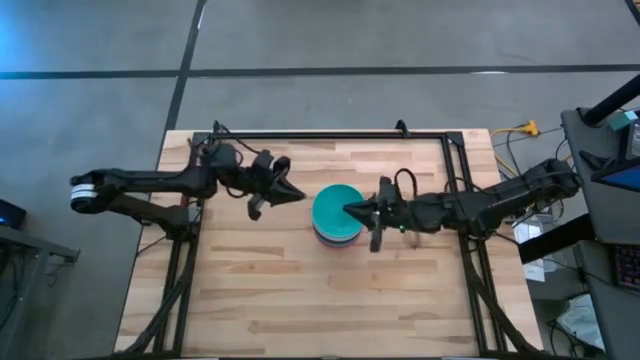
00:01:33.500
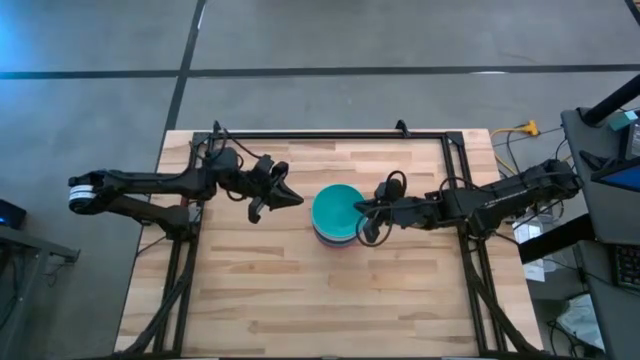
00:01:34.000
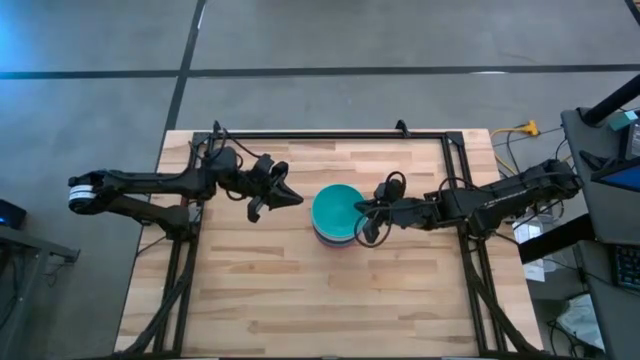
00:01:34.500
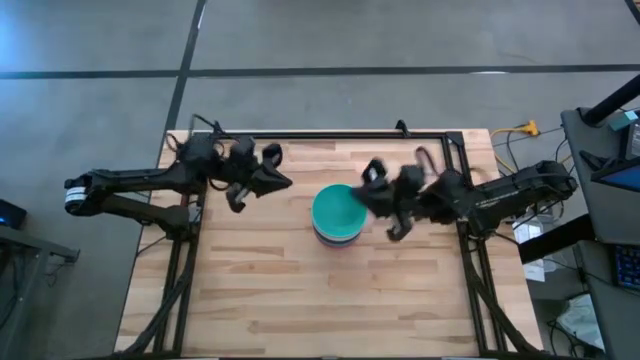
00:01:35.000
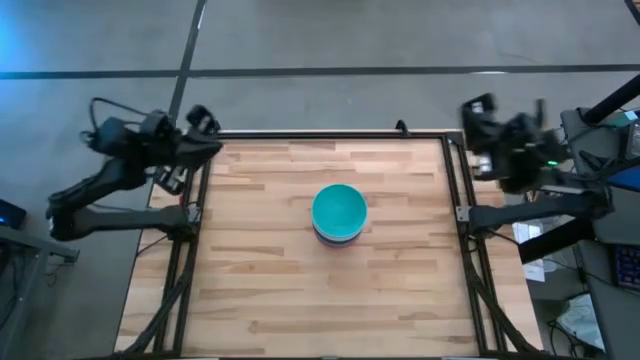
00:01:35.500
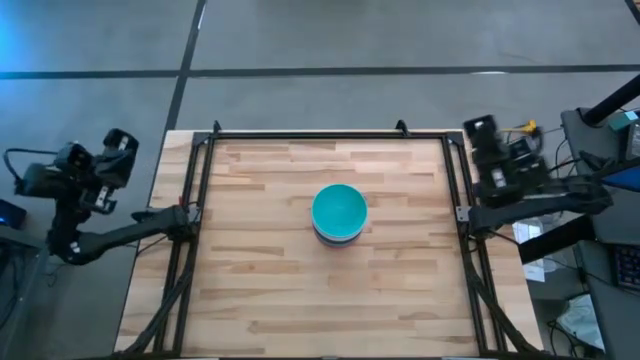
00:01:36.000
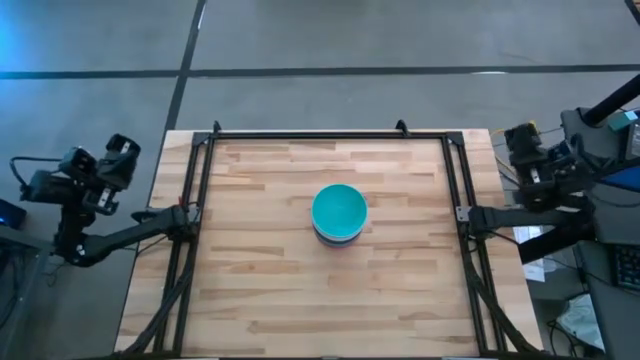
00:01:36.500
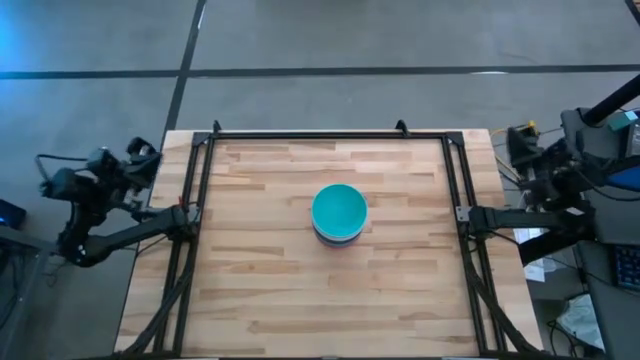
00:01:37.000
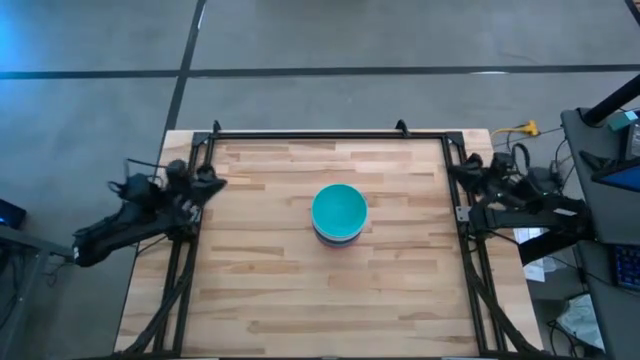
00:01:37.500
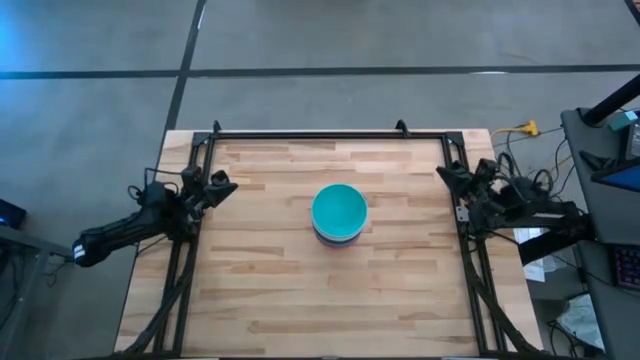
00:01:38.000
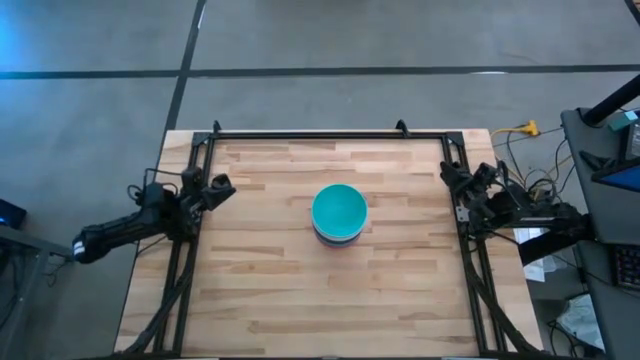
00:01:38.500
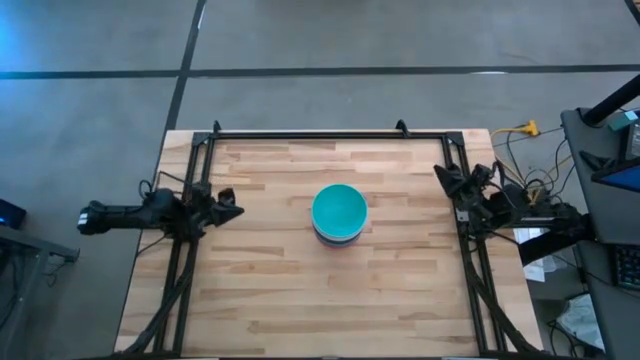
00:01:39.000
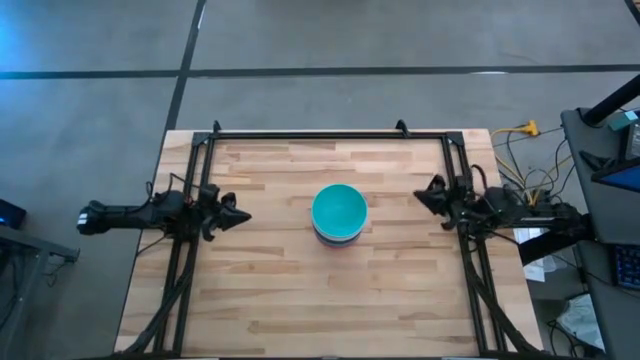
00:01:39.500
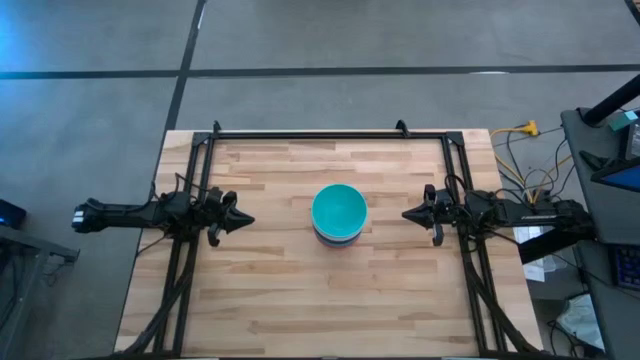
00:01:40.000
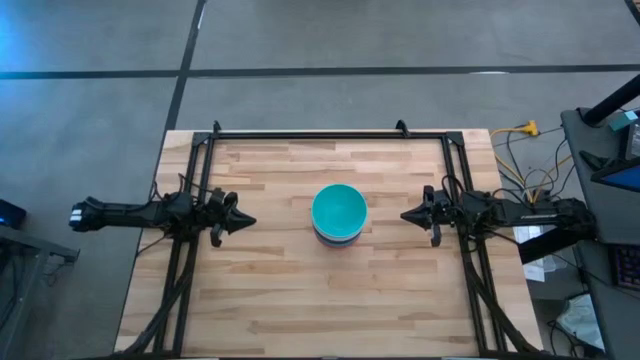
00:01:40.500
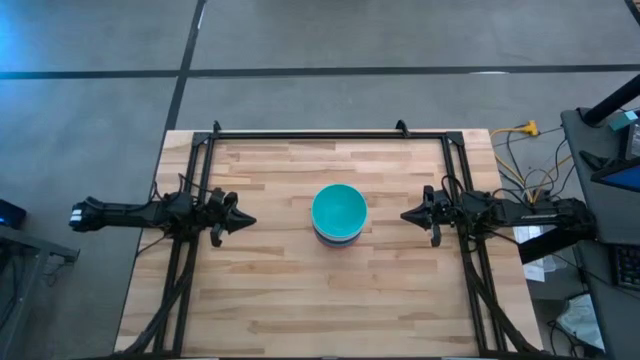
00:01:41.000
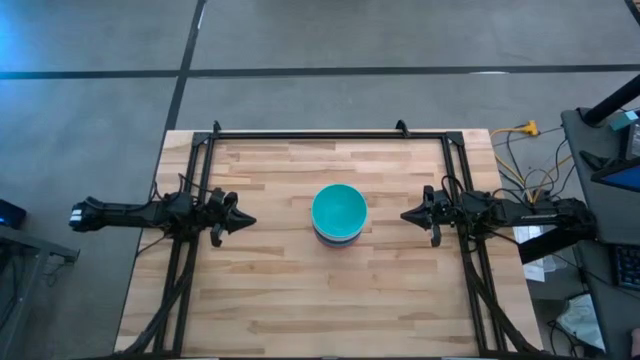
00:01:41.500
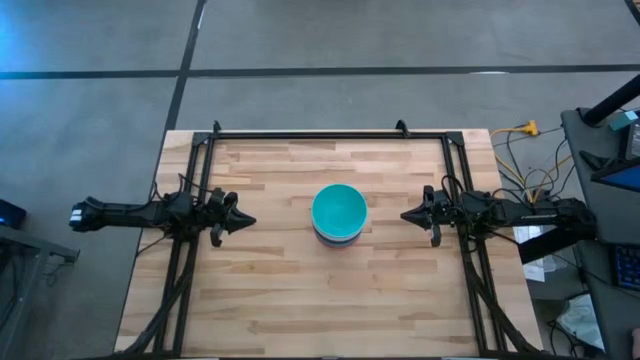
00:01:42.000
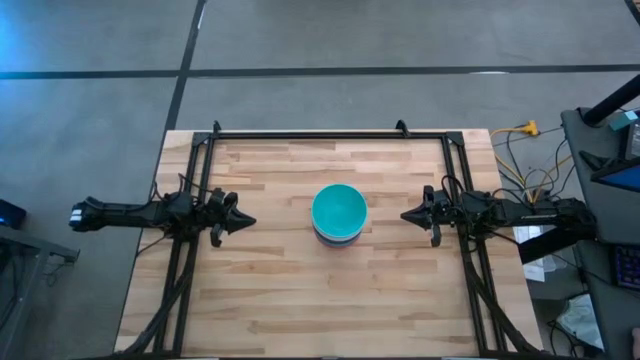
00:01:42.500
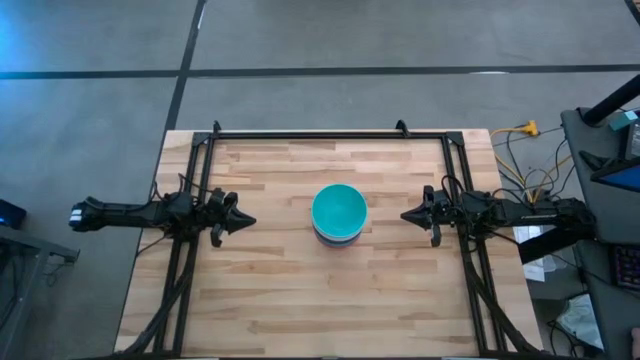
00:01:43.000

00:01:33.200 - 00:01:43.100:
Task: Nest bowls inside each other
Return to Home Position

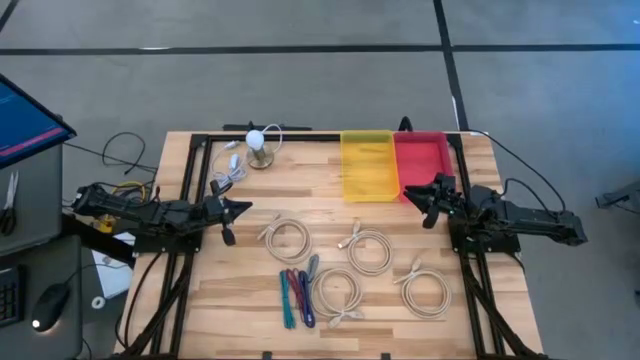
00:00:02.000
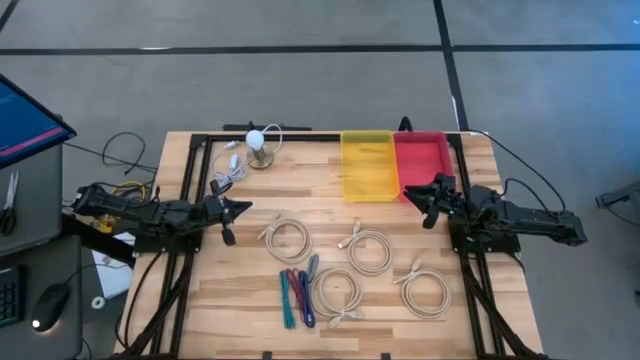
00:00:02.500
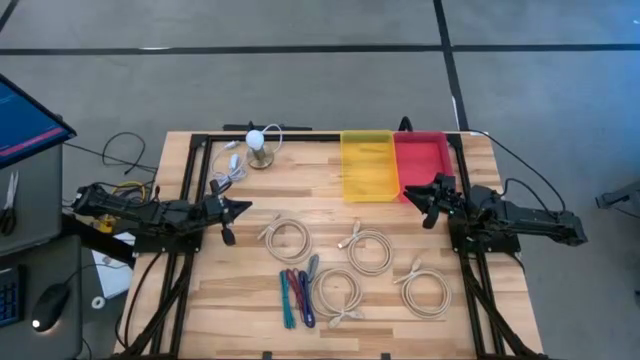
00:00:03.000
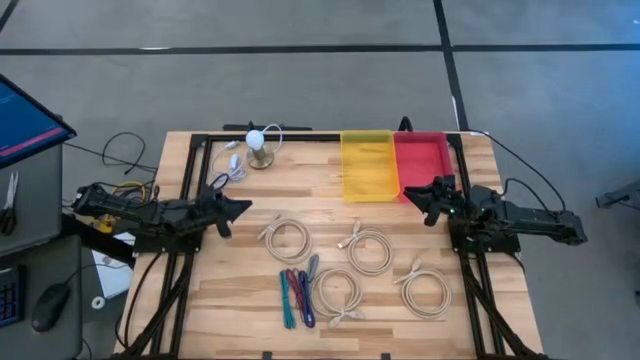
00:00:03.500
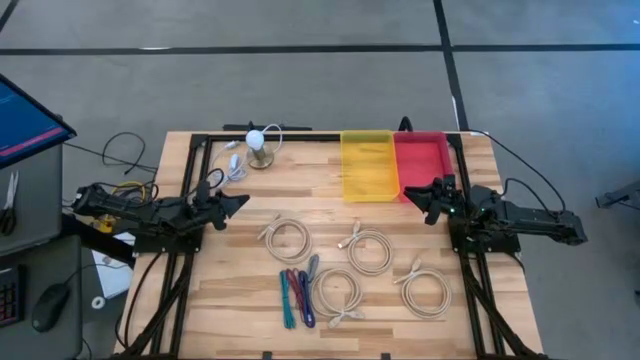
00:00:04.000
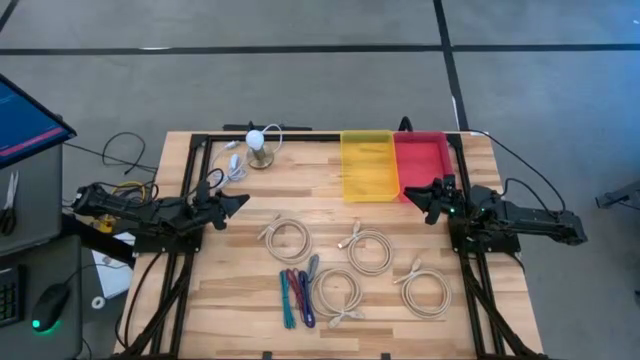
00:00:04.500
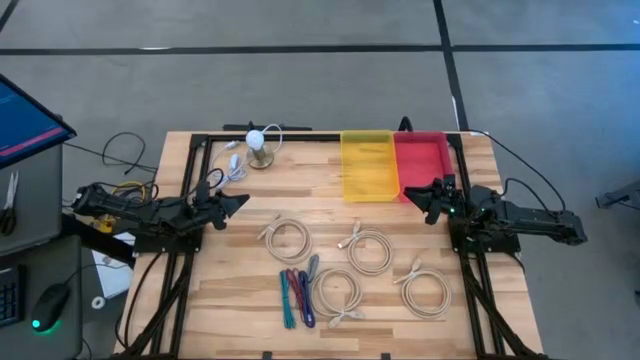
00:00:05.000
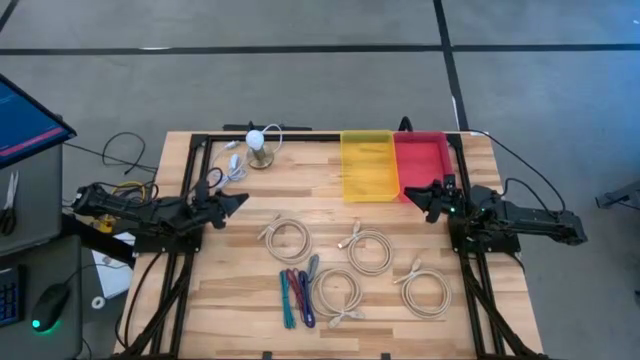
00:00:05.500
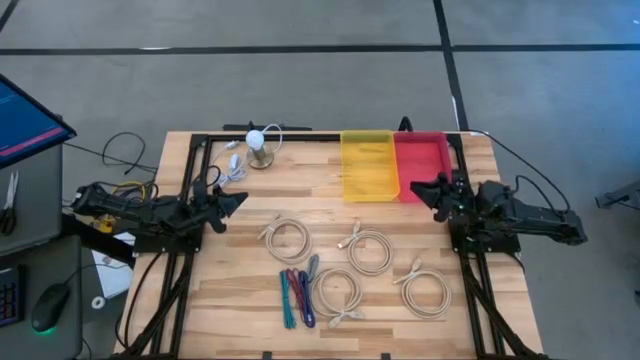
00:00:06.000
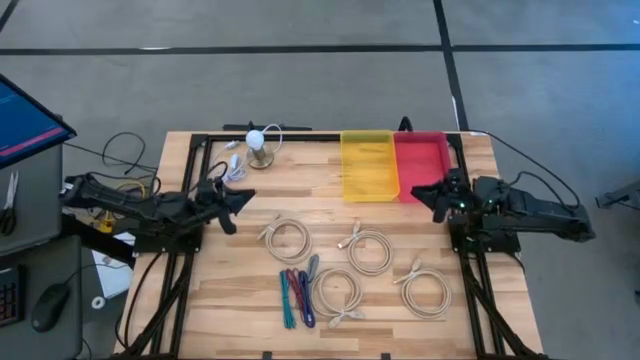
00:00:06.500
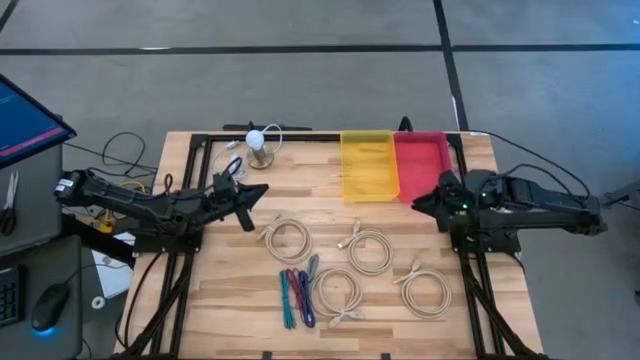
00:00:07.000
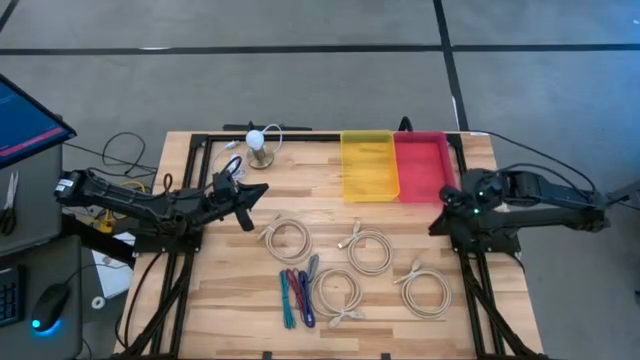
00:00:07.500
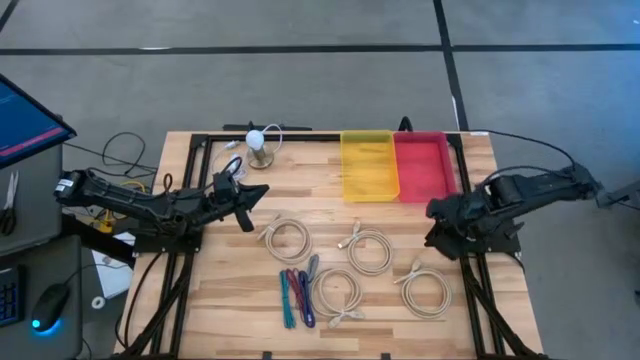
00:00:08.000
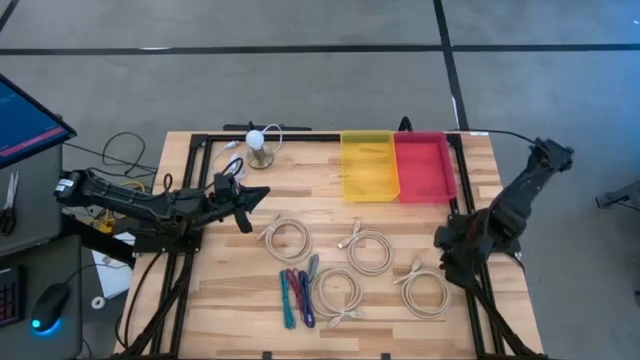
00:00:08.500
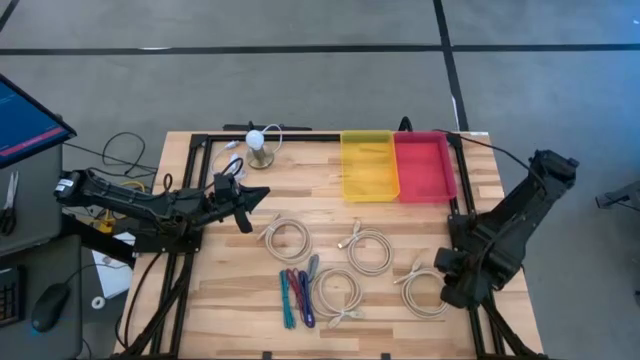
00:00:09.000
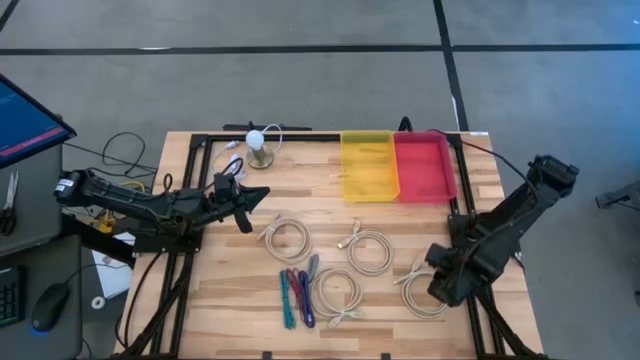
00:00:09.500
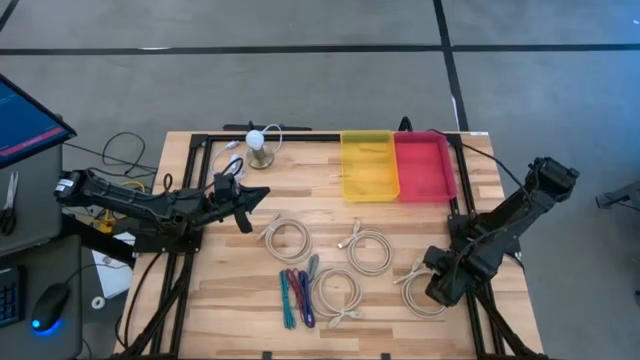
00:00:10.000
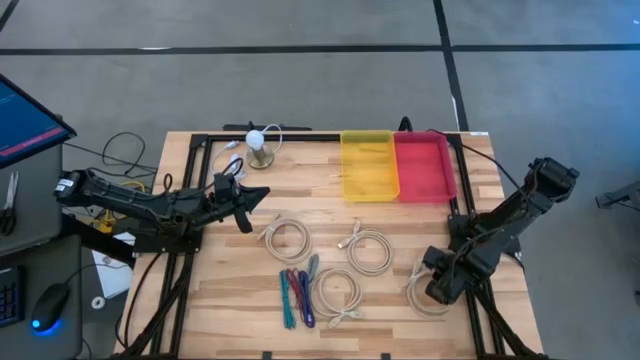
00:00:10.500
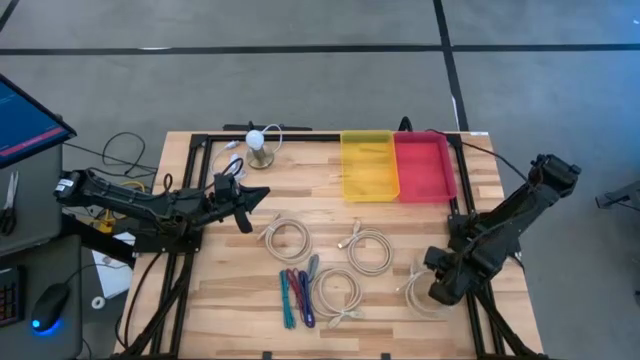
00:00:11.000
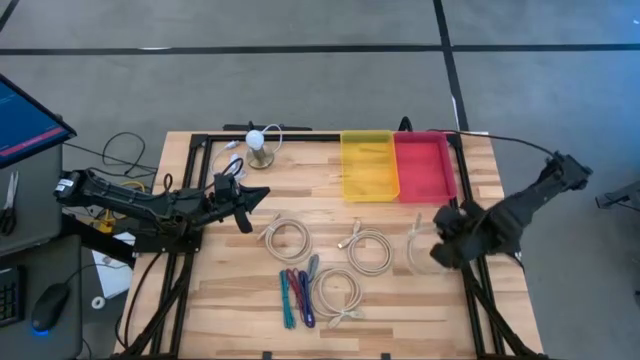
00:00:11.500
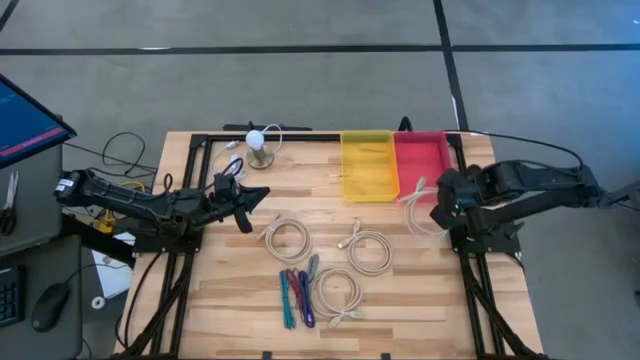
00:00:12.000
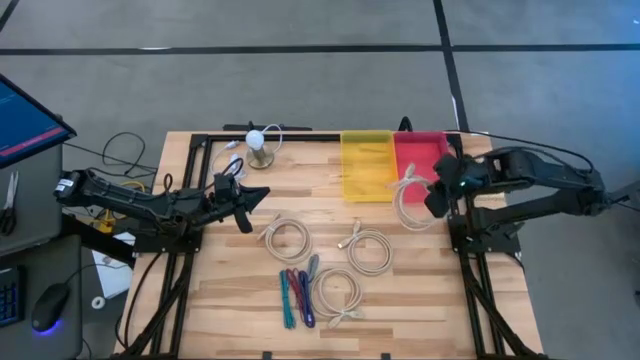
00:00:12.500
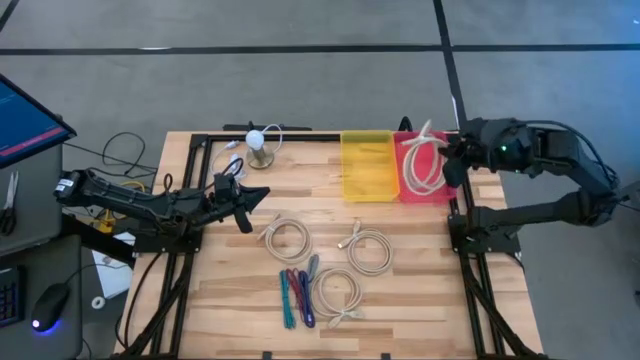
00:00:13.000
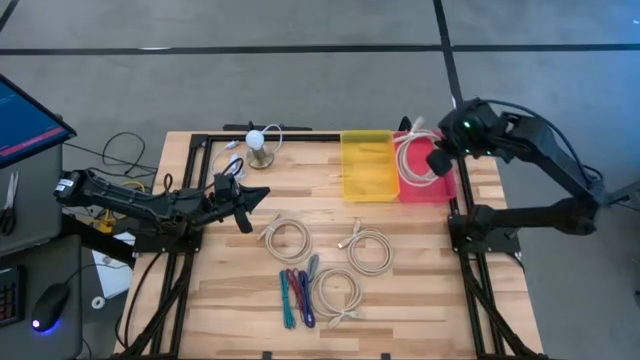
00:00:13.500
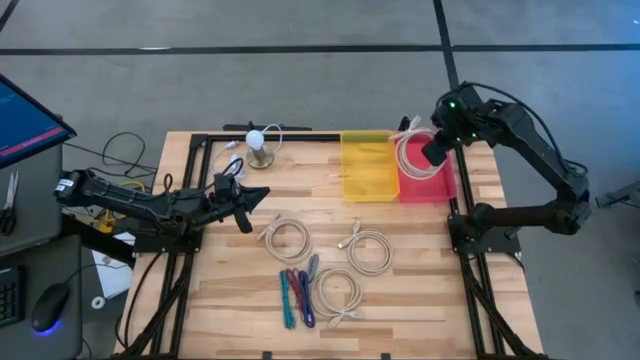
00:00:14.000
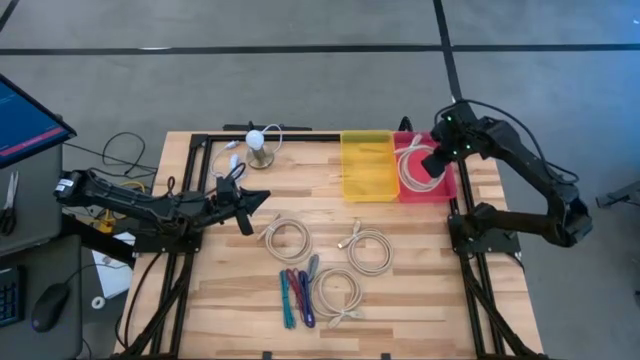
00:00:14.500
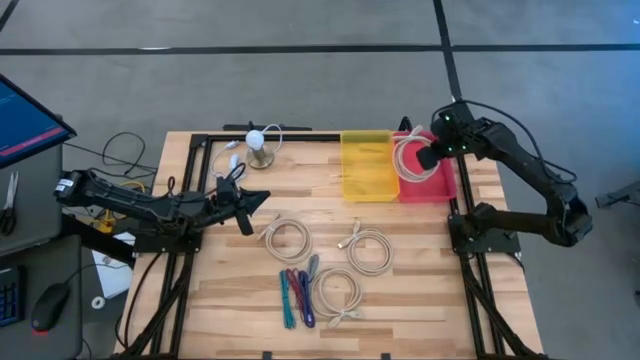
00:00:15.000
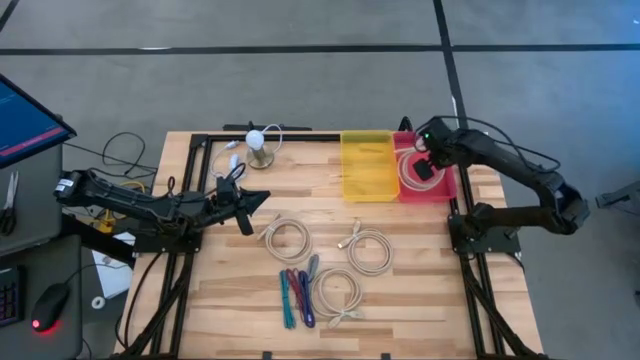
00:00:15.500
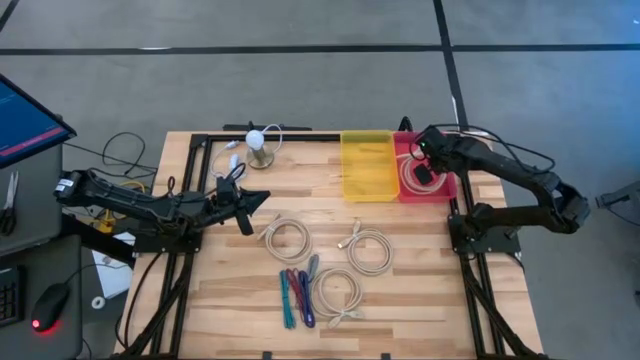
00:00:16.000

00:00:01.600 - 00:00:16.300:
Task: Pick & Place USB Port
Put the white HDMI cable into the red bin
